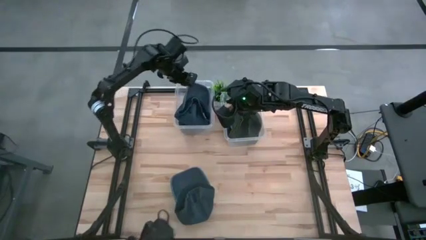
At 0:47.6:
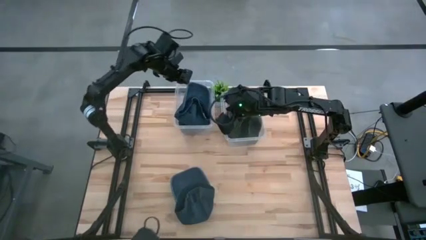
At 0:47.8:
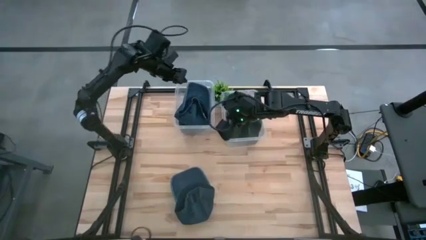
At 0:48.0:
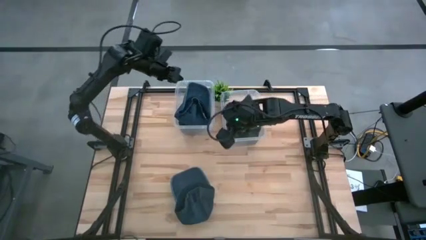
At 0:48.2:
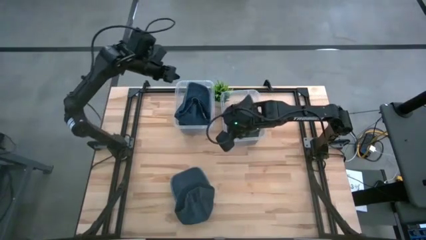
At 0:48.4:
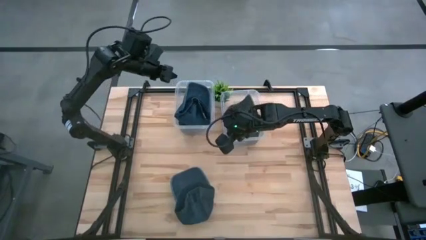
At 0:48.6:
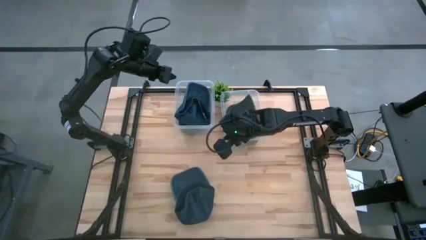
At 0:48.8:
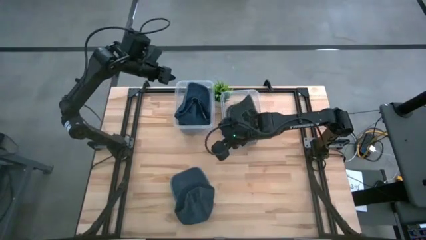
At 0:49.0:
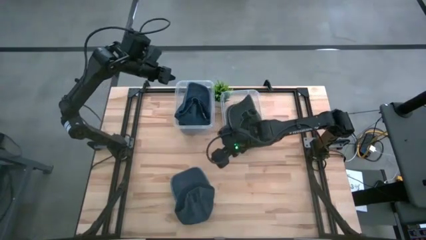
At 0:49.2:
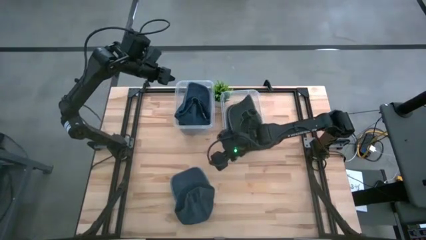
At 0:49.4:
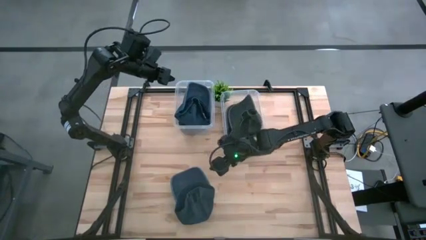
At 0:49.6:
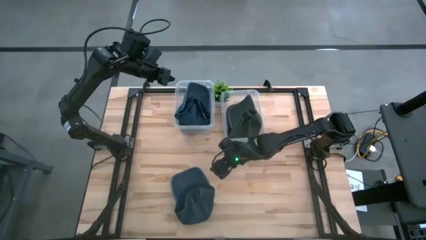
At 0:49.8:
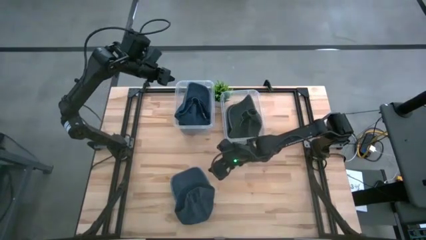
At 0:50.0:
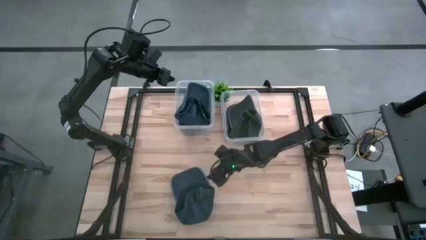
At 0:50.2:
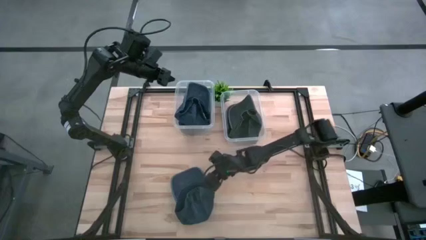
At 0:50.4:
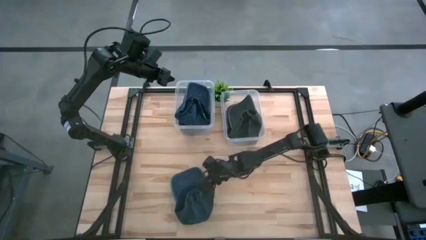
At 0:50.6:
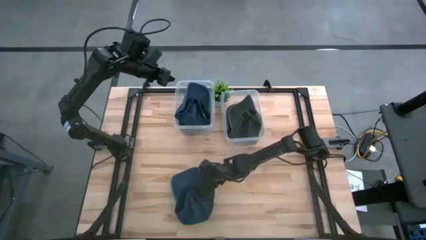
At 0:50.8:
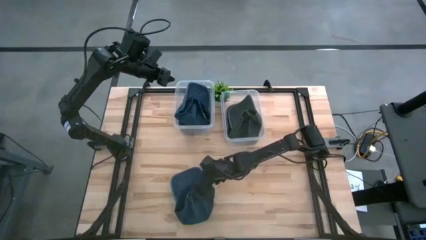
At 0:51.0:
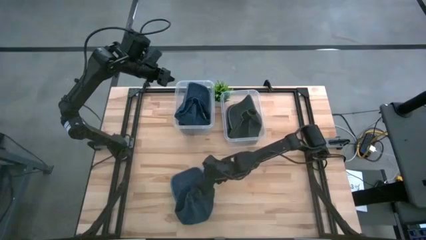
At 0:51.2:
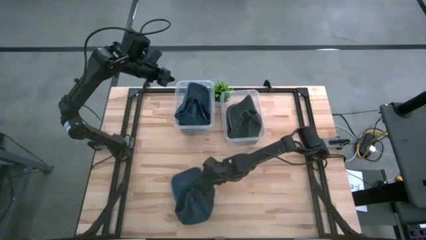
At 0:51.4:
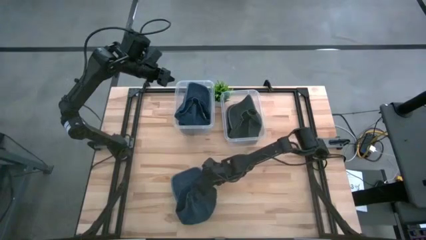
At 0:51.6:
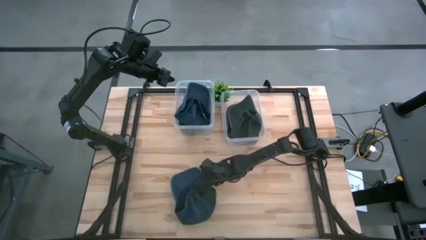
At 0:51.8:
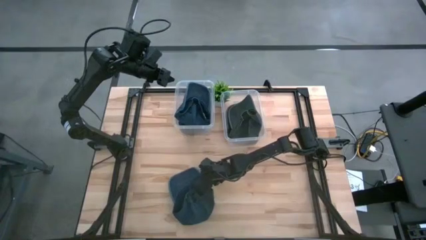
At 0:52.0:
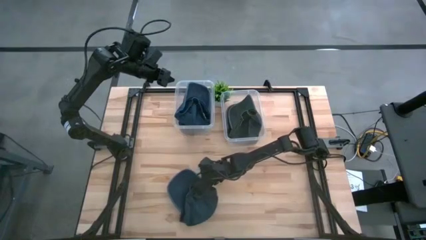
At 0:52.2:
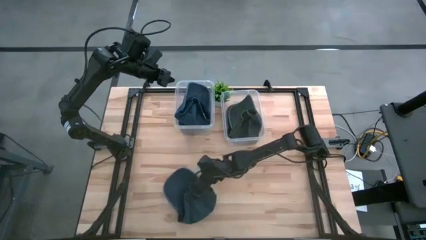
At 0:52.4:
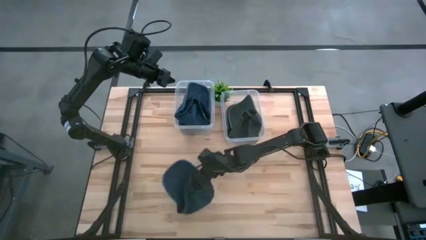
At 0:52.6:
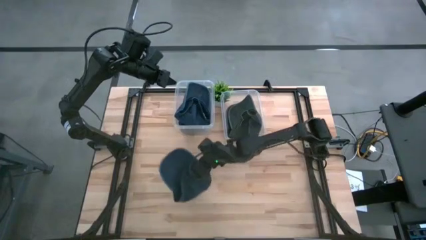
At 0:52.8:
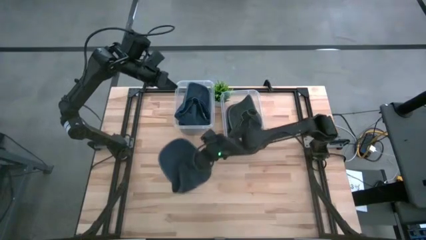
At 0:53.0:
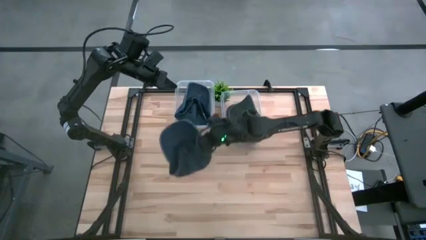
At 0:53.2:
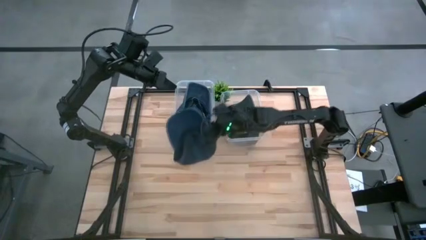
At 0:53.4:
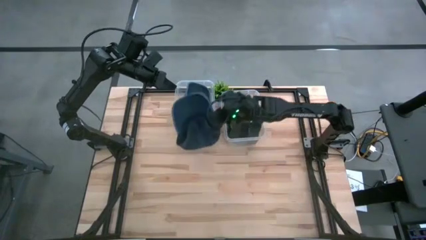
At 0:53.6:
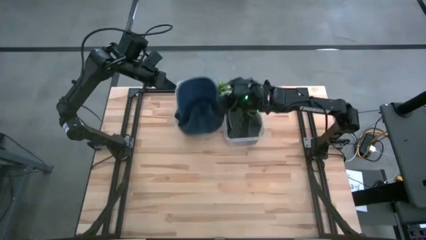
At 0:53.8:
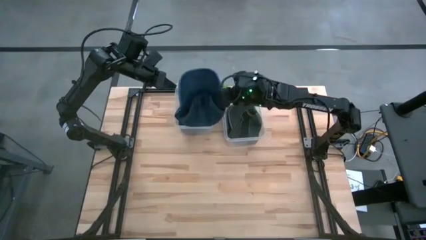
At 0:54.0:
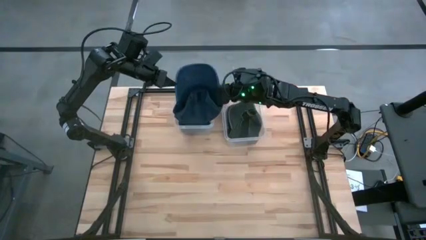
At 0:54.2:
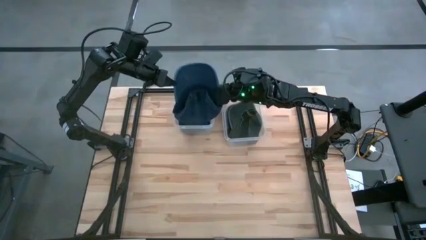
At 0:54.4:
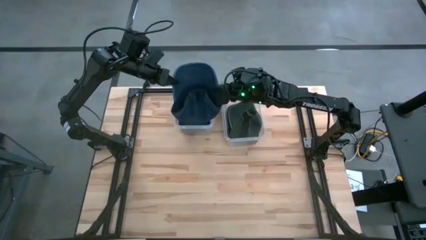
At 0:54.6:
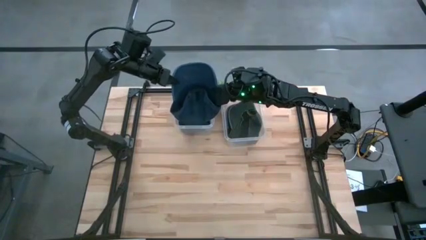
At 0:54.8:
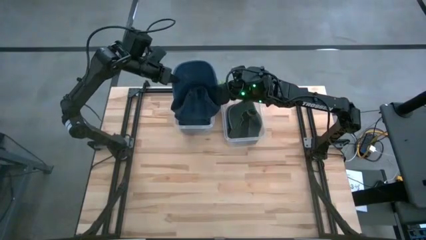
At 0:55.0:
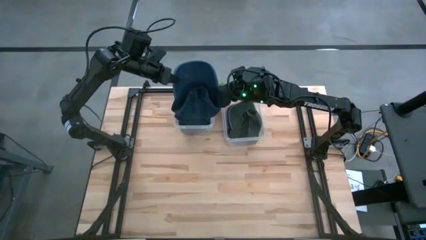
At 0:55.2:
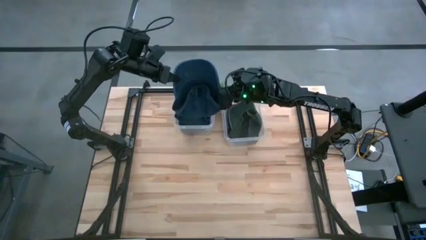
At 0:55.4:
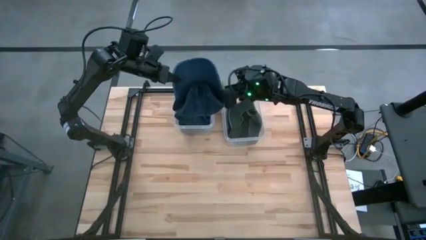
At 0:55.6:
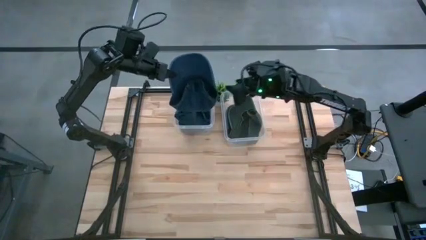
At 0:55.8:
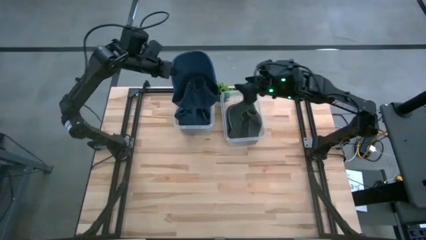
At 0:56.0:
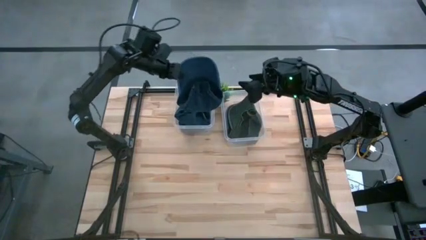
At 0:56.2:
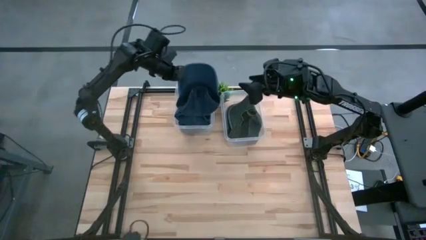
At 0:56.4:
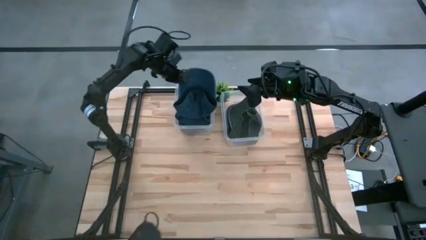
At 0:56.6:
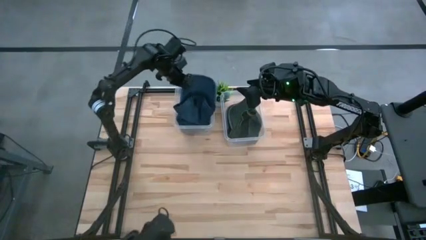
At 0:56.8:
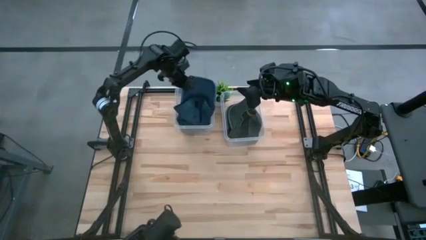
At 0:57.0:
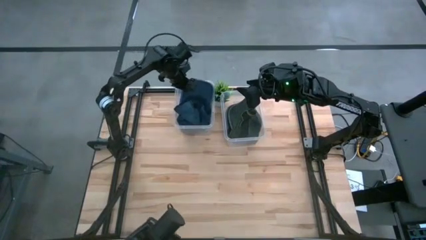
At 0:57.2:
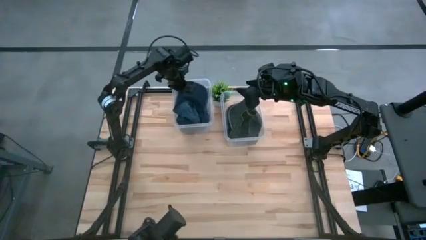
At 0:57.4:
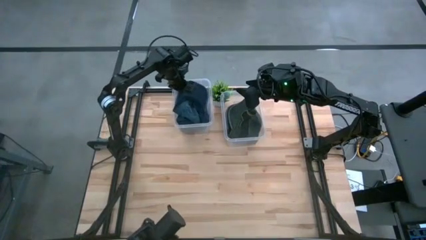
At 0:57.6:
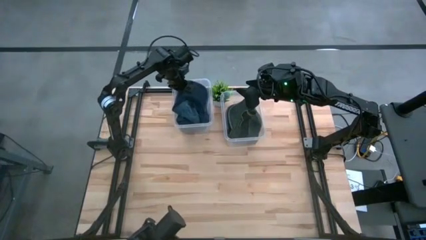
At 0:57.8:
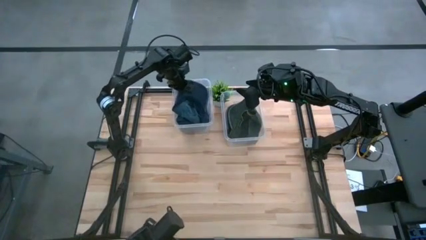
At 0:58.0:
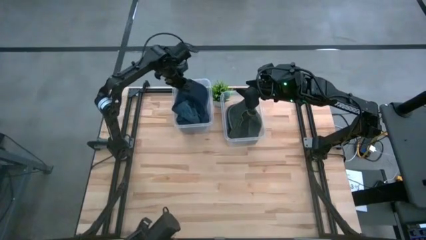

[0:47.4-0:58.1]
Task: Pick & Place hat
Put the blue cap into the left transparent bin

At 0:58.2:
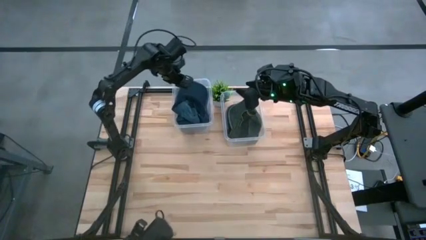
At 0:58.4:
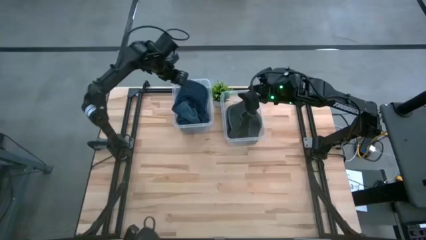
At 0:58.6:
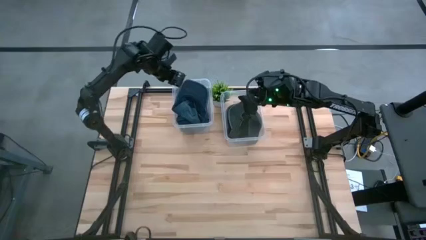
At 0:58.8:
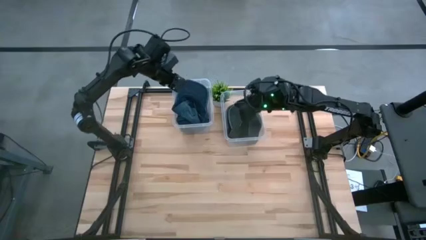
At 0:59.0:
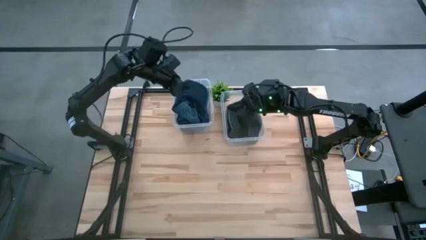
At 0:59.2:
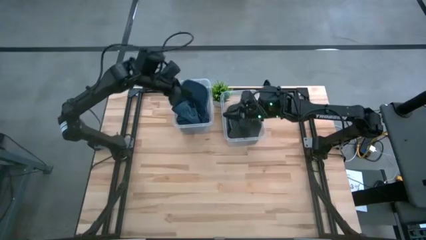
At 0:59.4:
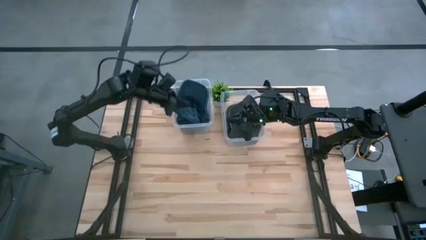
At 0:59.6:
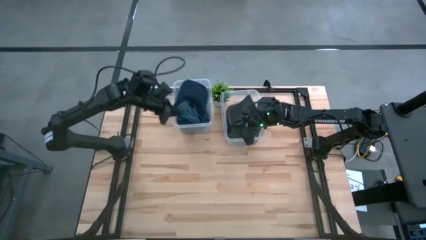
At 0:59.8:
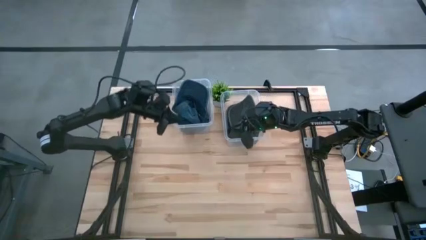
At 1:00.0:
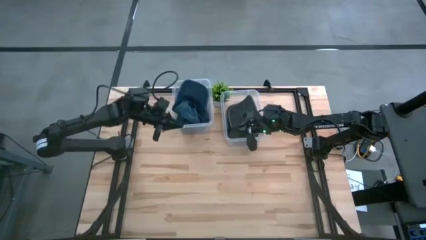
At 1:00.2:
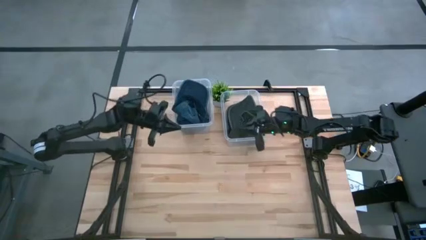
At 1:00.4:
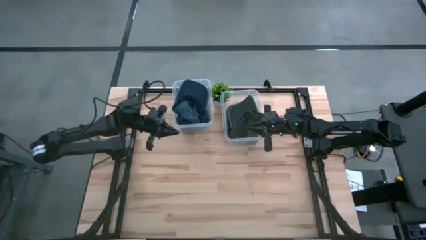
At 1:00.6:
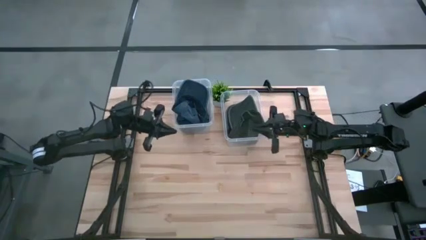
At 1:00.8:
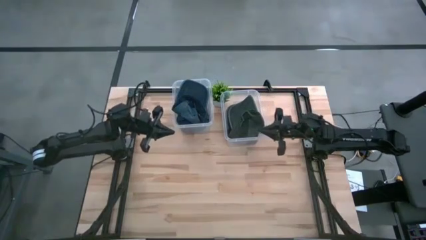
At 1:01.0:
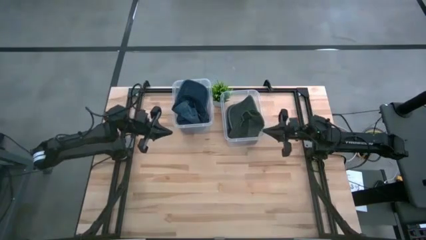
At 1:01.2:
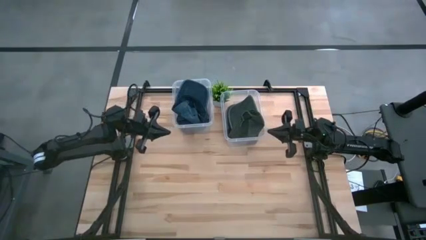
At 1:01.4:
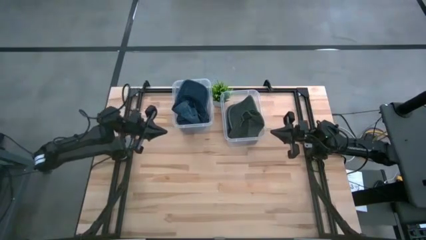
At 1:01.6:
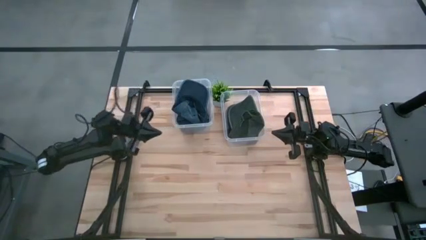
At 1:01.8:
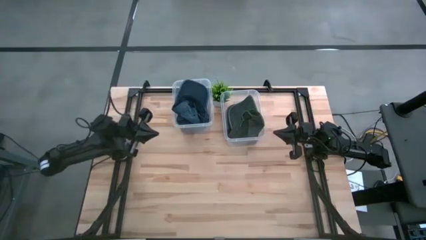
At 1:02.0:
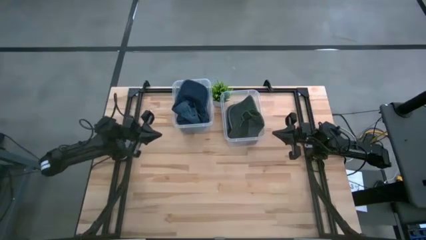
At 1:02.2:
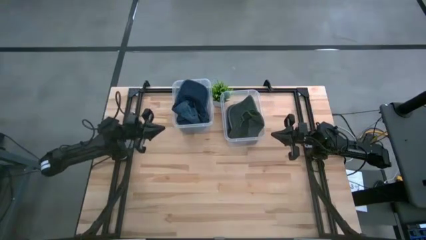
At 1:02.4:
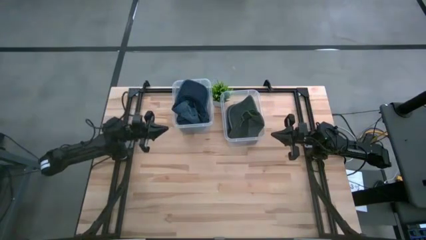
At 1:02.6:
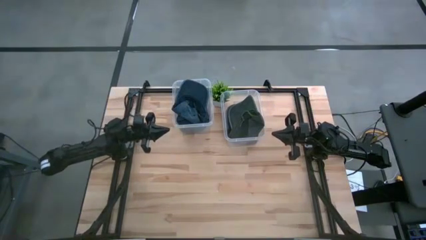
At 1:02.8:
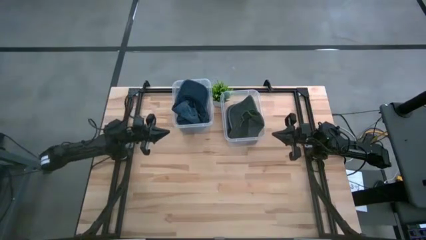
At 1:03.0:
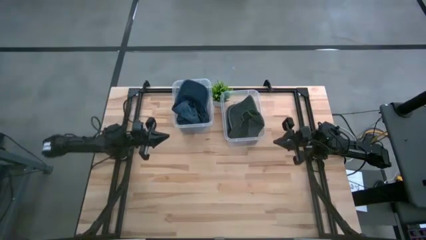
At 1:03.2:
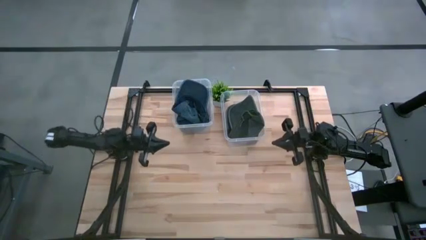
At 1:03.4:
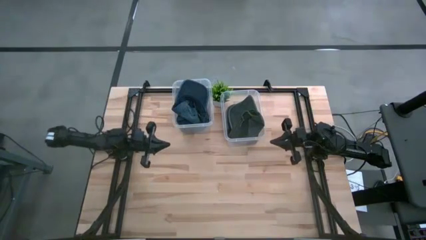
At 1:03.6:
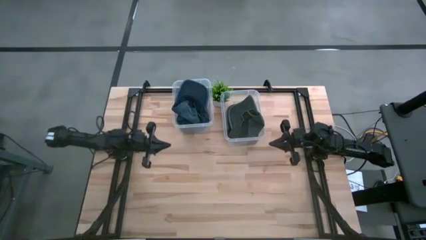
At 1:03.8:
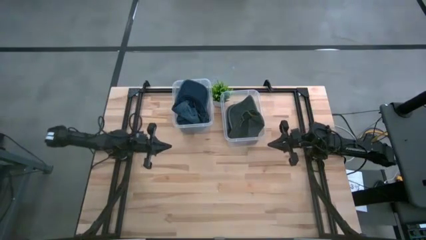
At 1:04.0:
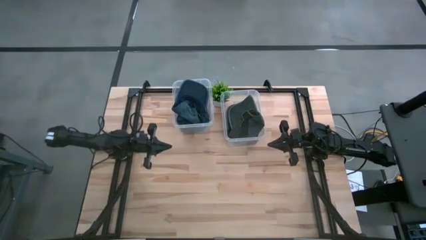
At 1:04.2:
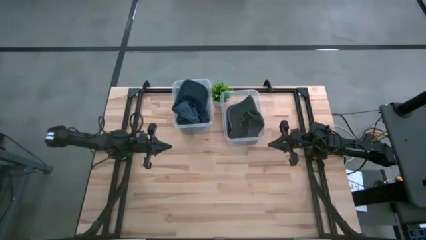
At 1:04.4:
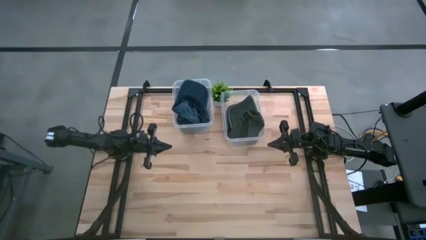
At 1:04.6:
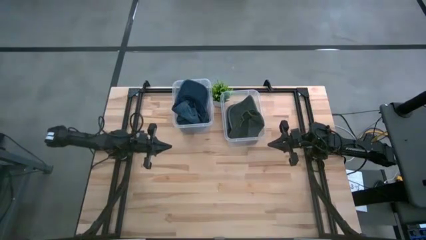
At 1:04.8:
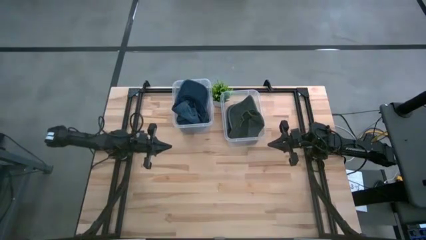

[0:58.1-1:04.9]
Return to Home Position
